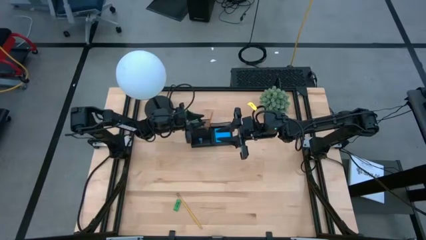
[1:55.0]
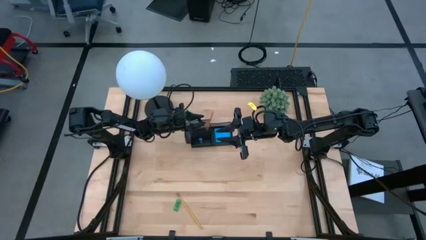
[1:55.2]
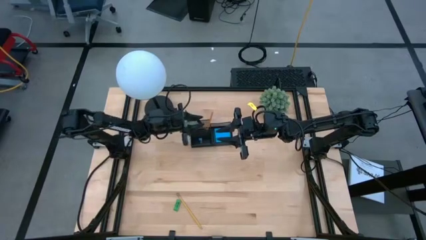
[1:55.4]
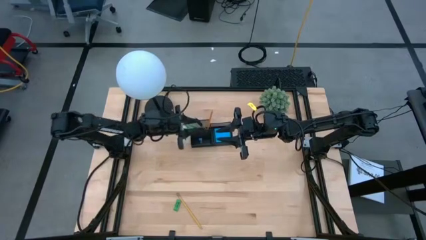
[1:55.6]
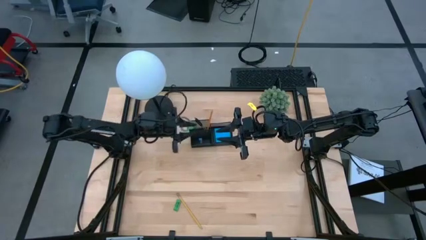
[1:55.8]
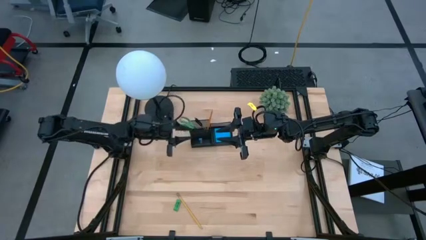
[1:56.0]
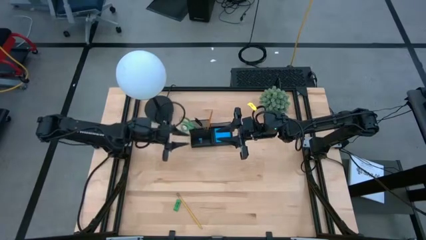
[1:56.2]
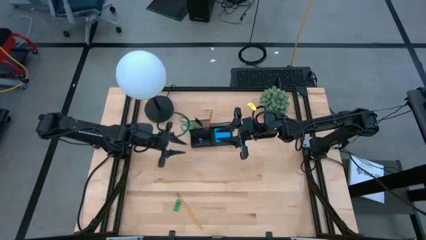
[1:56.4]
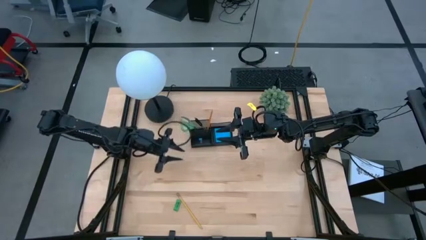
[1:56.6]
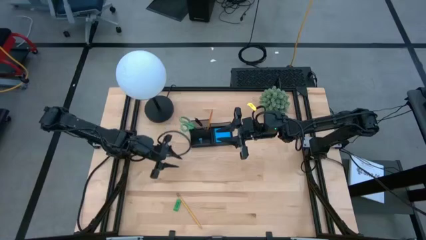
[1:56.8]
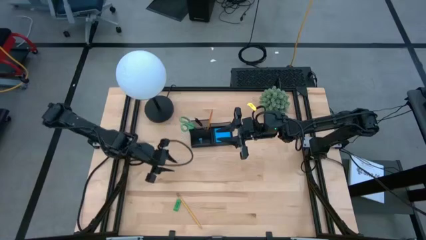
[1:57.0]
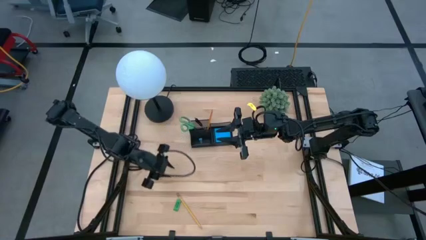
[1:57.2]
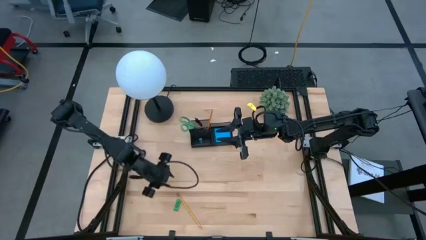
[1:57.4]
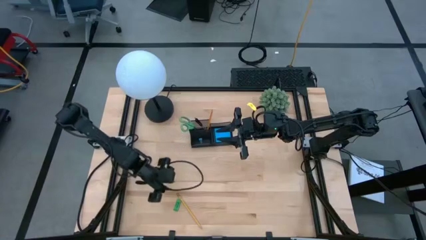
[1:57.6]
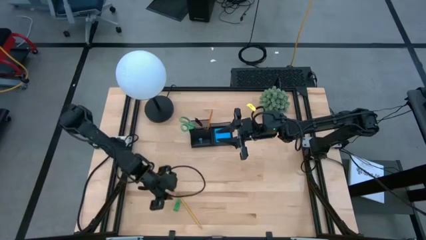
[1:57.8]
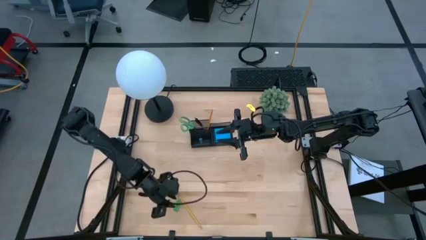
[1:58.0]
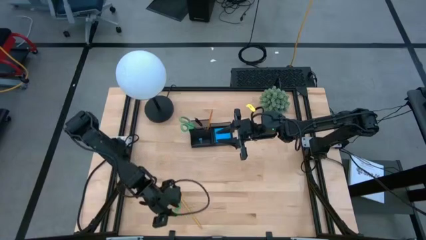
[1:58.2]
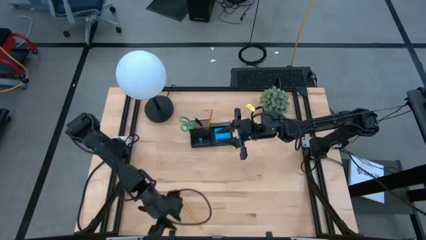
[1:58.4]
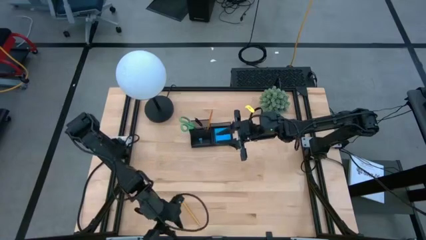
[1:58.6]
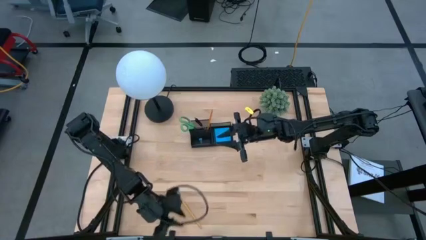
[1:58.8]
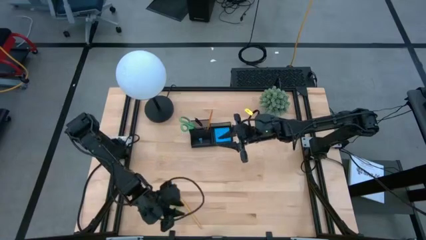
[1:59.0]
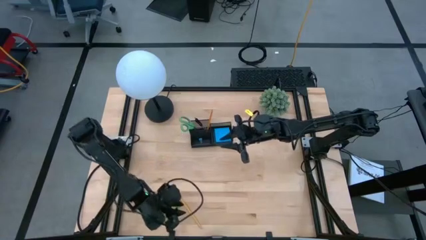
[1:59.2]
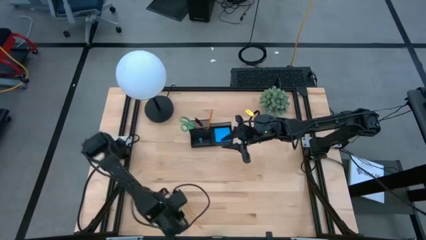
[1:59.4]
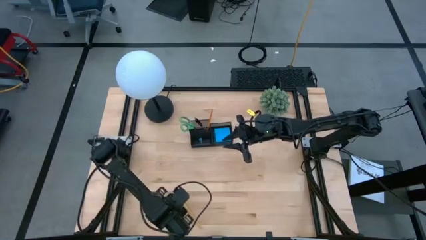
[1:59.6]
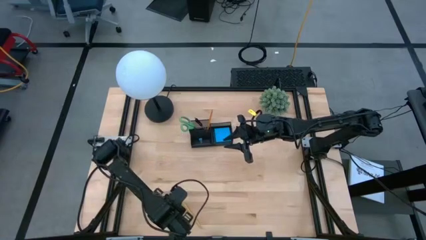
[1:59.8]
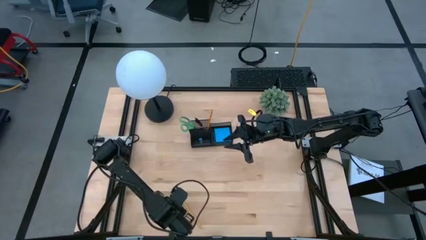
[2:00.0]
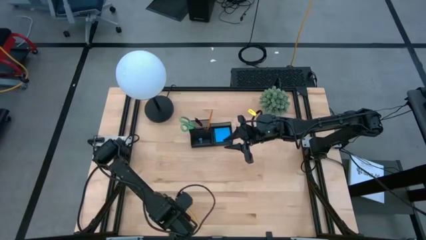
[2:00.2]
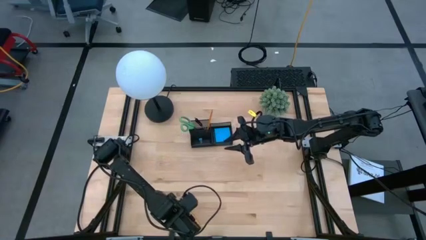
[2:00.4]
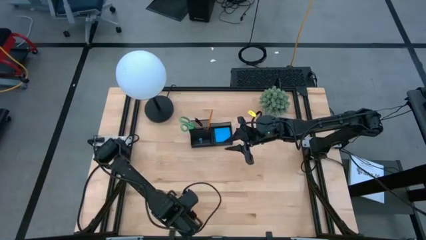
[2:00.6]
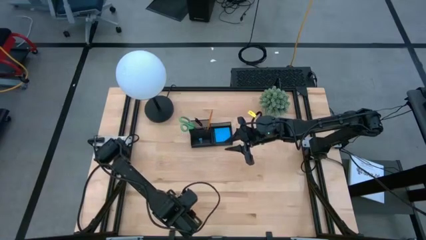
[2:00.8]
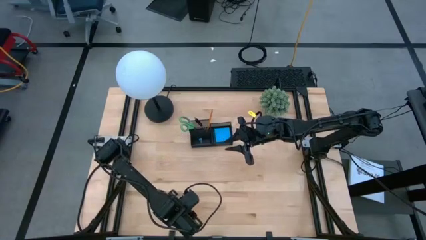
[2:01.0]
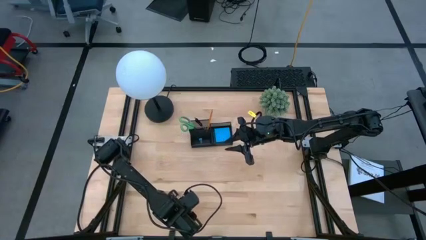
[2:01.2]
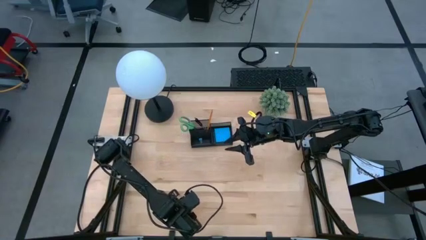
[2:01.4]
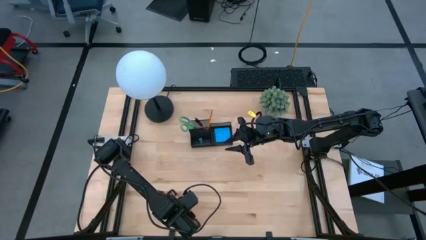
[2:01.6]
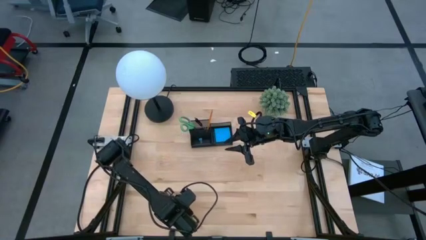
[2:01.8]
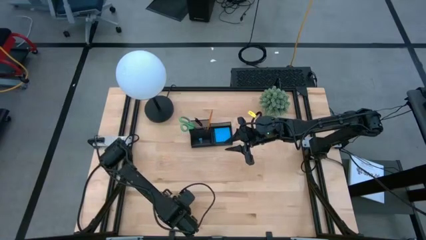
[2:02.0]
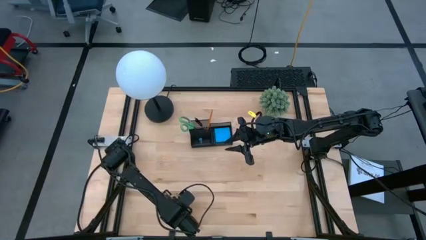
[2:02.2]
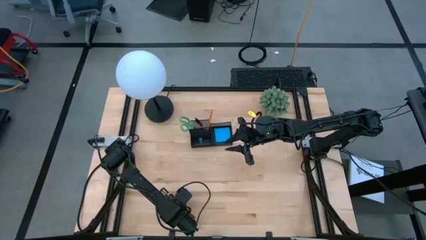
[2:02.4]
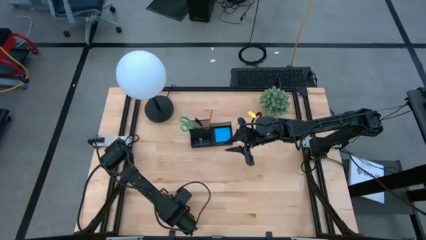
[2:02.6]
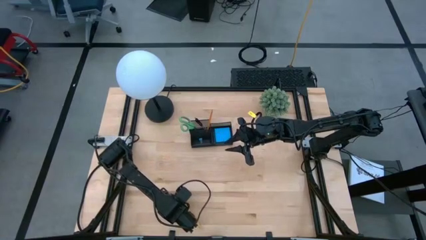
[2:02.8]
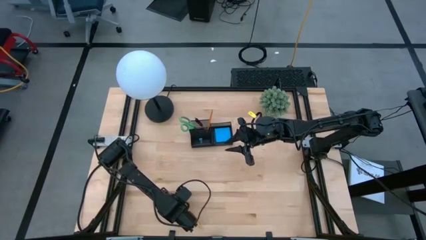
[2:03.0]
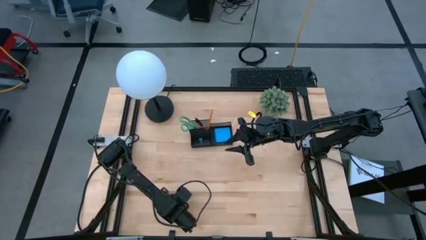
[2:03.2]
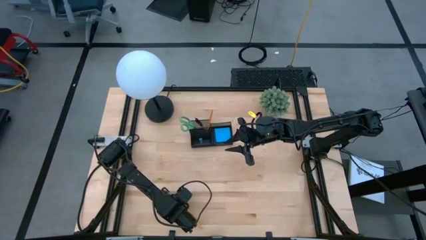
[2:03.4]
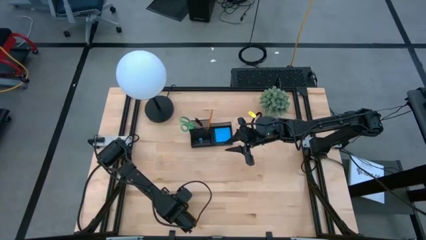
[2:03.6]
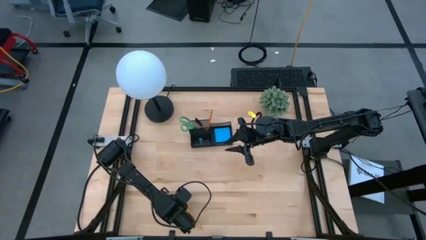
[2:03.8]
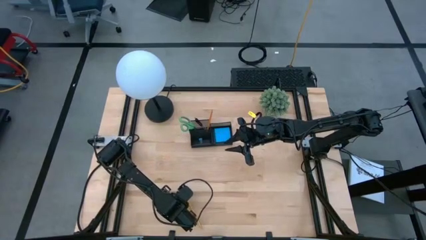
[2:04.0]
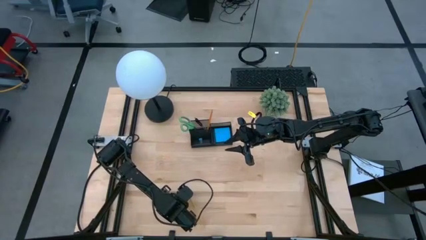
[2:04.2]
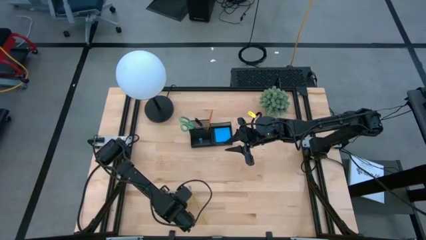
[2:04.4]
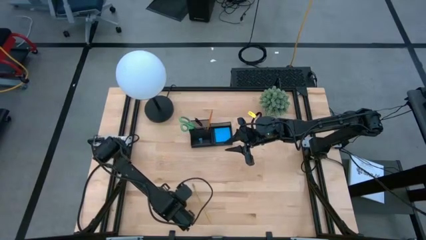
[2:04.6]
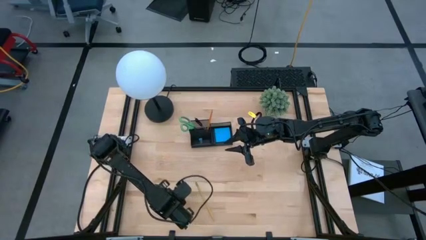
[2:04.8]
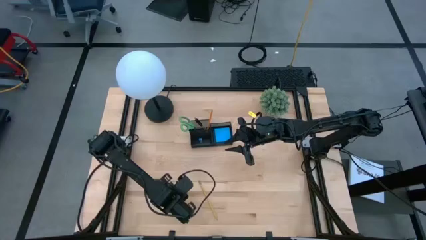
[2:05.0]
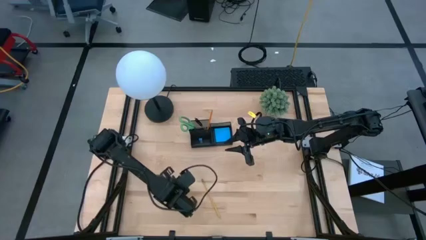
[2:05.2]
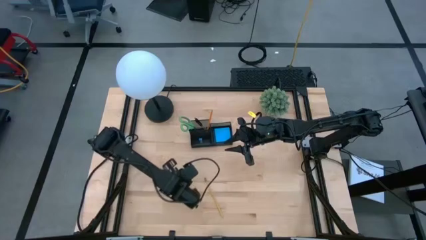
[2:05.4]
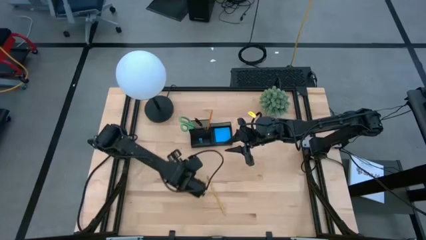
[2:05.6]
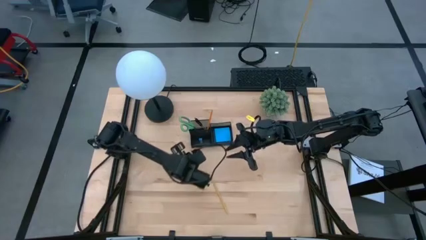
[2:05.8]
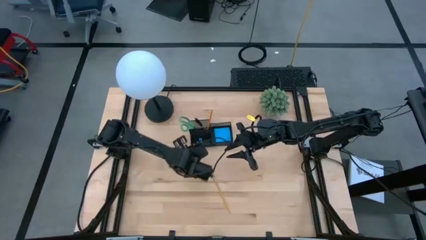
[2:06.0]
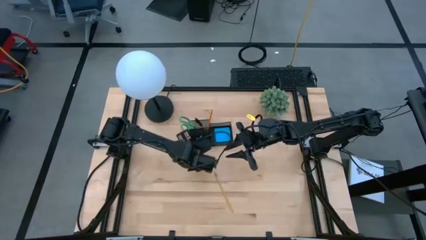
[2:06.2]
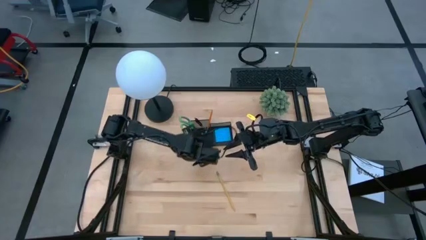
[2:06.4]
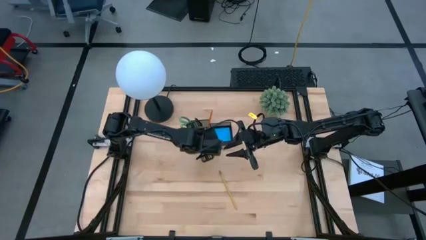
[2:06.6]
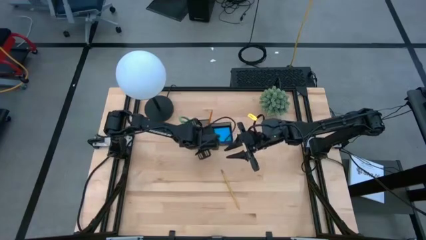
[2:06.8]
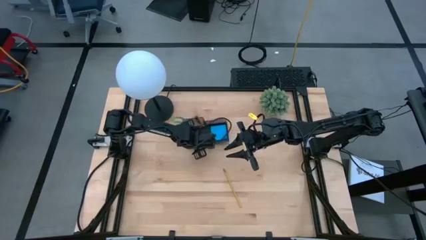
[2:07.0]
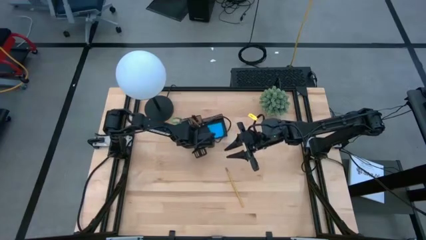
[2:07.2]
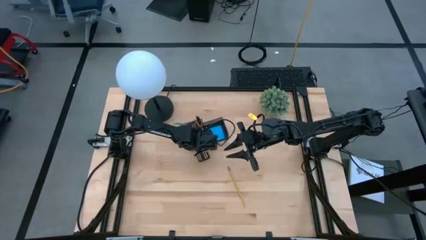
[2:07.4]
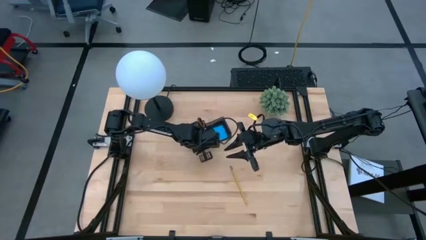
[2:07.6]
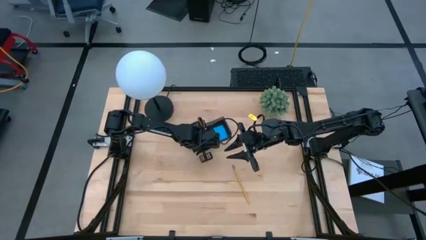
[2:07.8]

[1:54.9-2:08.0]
Task: Pick and place office supplies into organizer
Put the green eraser into the black desk organizer

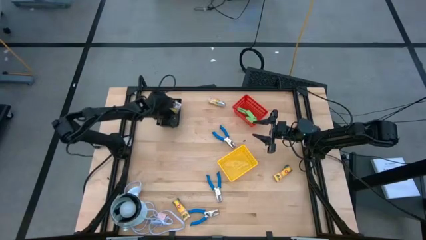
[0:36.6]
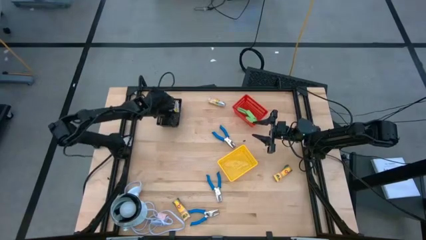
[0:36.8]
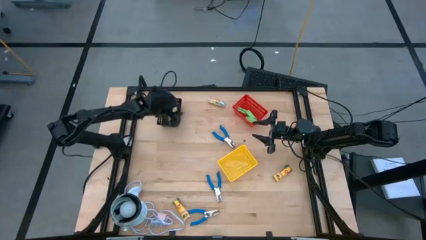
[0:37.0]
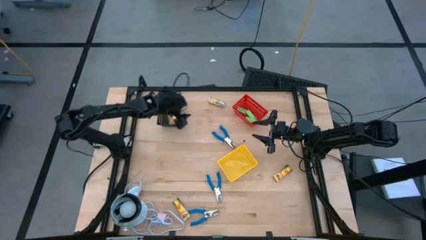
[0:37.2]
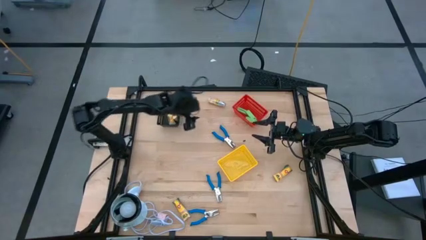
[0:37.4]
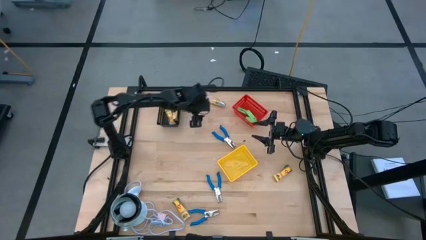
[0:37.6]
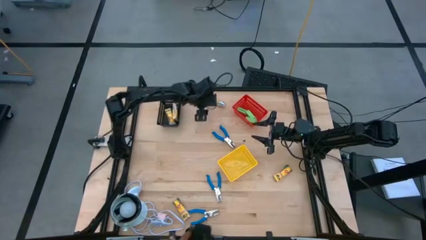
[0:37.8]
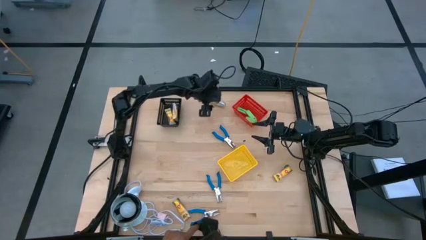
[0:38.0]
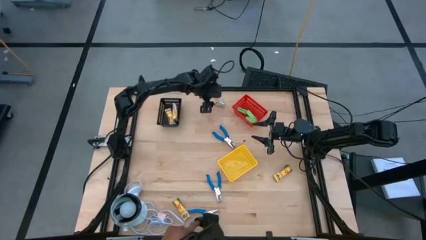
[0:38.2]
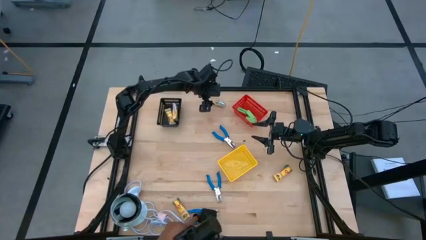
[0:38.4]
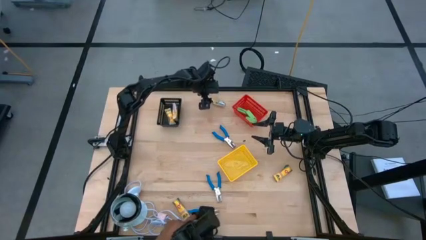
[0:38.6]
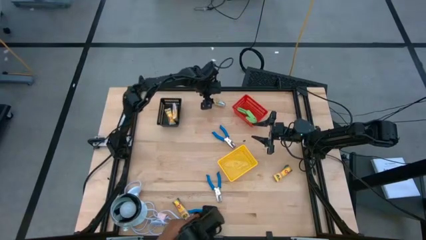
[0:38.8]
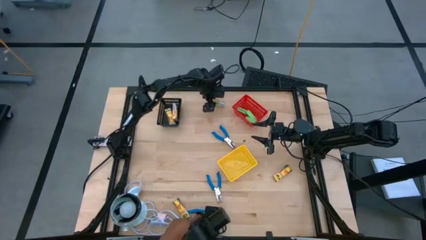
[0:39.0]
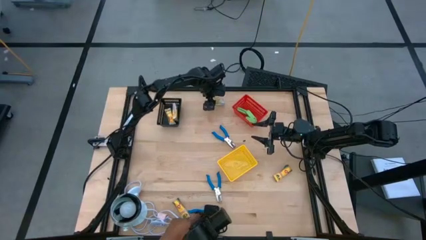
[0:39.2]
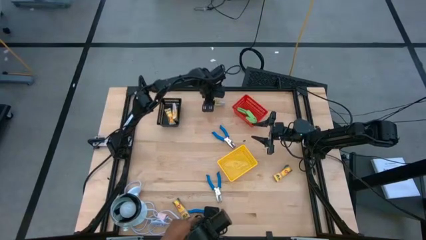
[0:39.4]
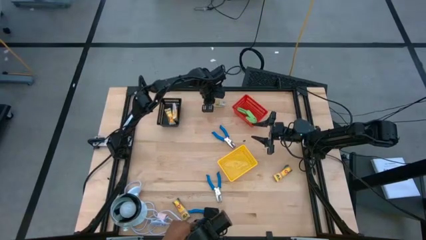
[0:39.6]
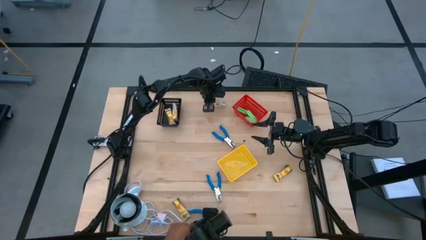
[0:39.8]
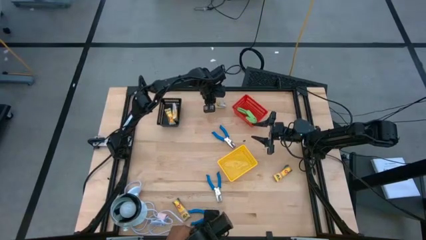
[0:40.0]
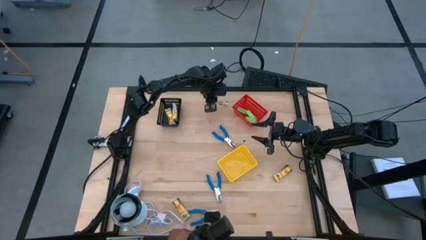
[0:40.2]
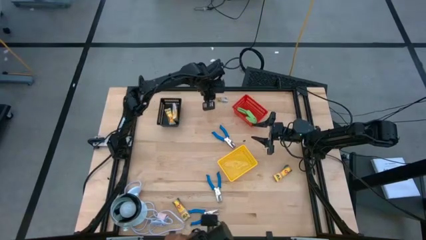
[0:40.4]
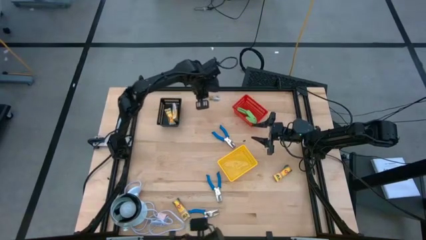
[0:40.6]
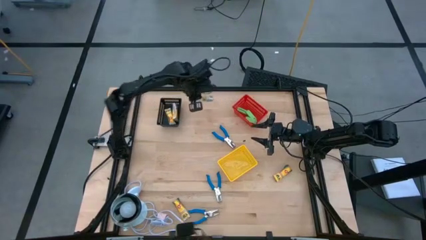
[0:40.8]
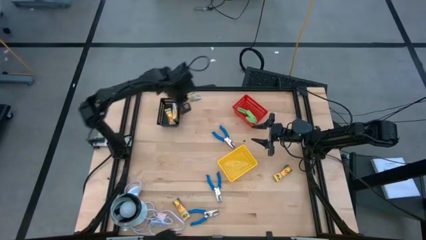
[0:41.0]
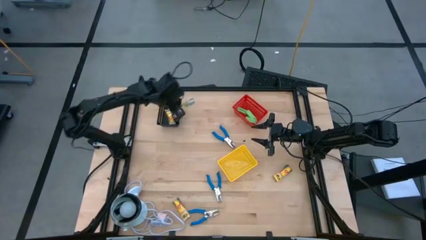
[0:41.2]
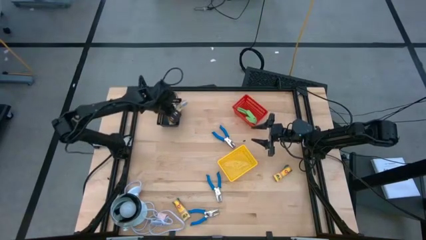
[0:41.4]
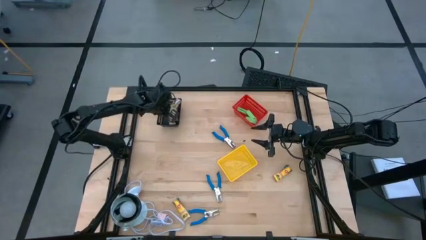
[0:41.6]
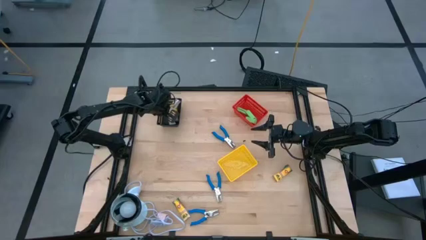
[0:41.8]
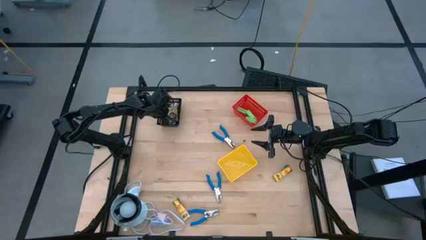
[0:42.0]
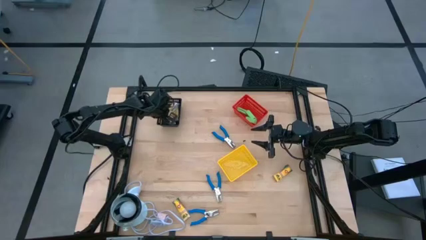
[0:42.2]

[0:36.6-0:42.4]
Task: Pick & Place School Supplies
Put the yellow crayon pack into the black bin
